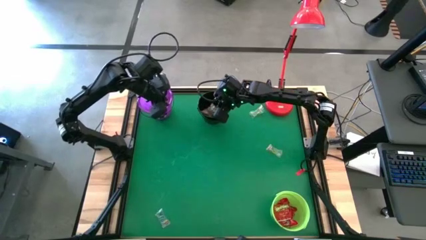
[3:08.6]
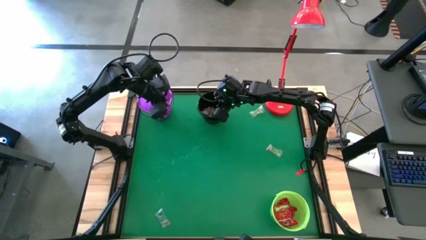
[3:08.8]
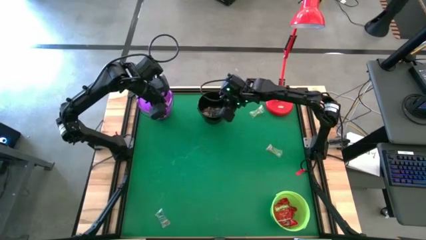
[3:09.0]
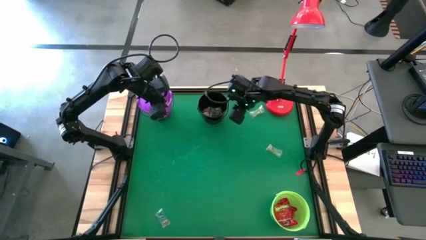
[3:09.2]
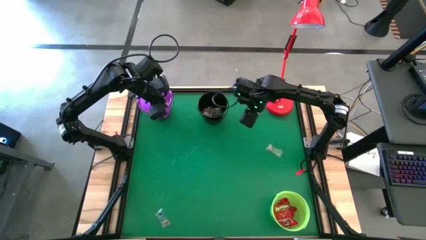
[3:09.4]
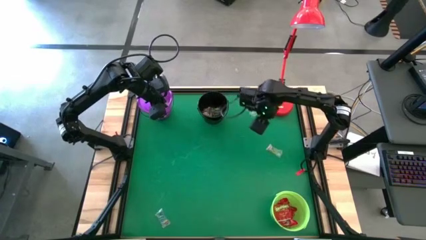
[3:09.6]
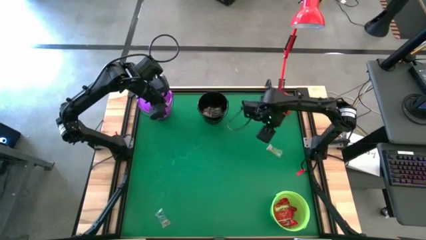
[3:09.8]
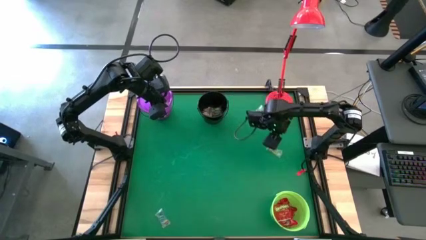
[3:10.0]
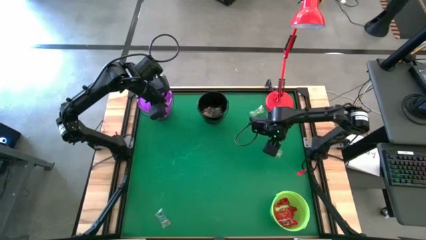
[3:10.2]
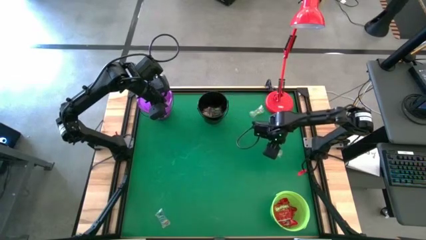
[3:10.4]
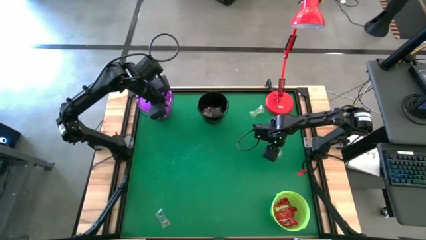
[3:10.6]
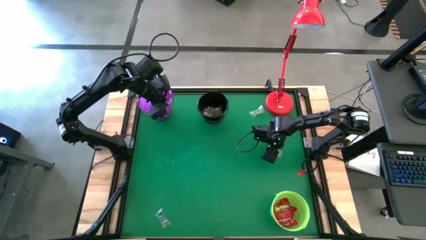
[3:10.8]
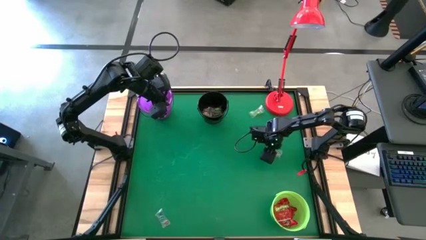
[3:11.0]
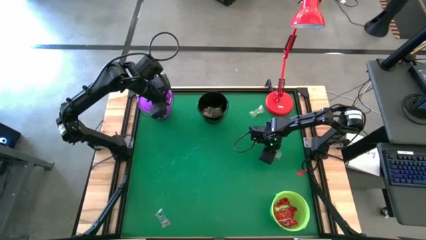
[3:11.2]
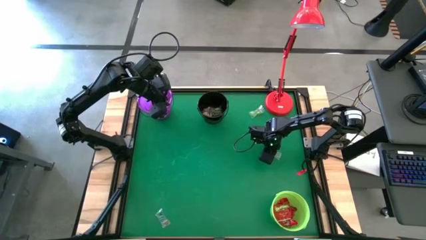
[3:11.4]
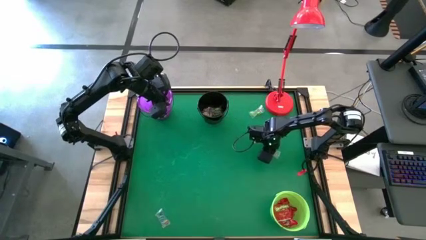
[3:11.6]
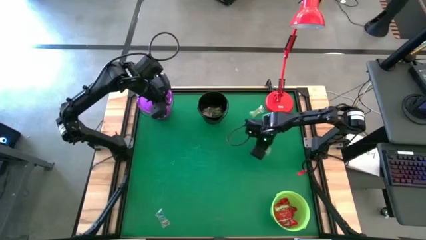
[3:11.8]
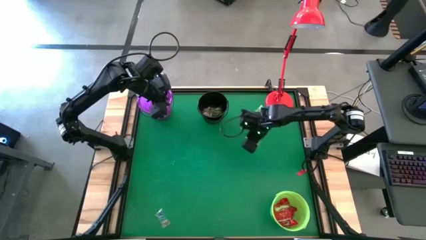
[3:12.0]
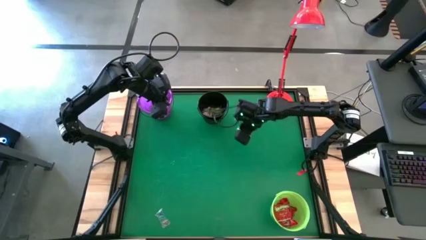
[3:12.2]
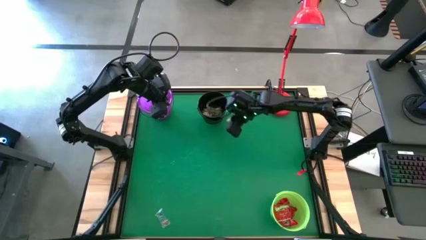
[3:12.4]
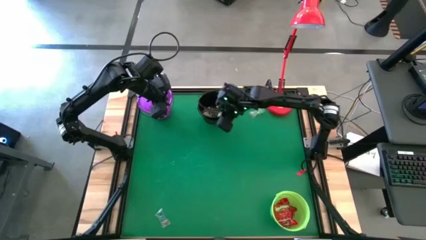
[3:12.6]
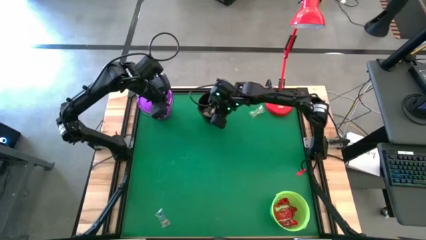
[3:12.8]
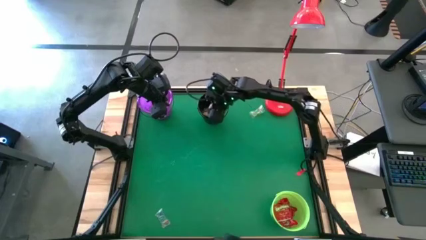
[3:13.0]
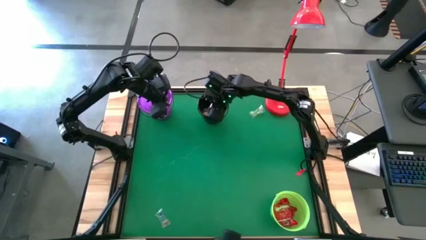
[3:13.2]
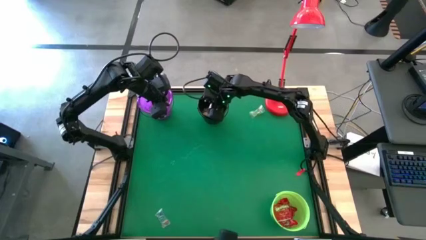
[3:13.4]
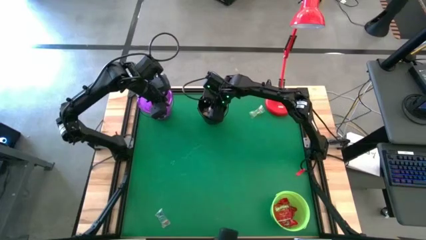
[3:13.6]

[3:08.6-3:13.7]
Task: Sort candy
Put the bottom green gummy into the black bucket

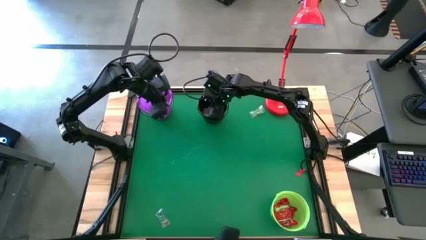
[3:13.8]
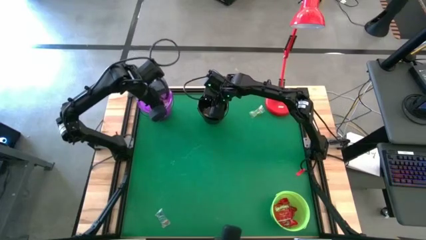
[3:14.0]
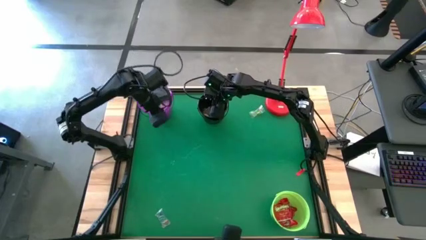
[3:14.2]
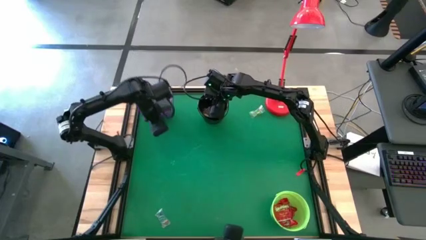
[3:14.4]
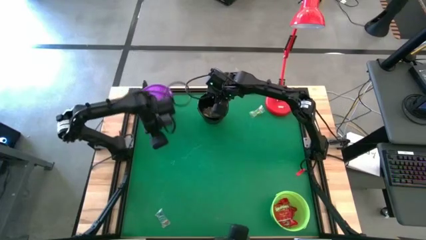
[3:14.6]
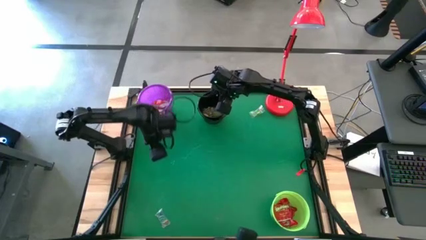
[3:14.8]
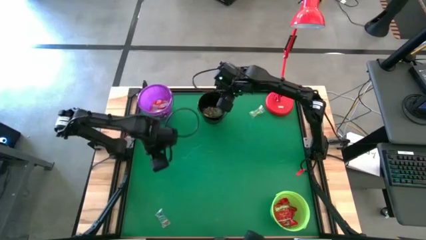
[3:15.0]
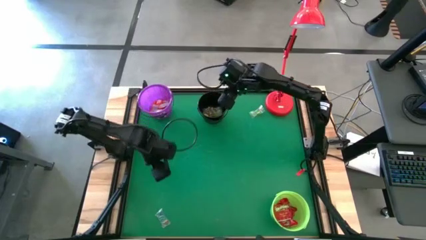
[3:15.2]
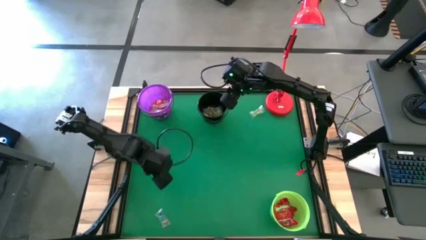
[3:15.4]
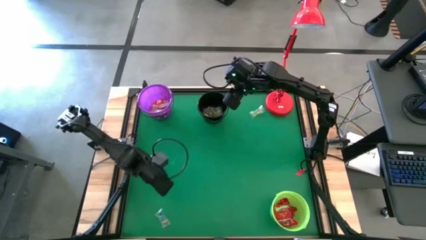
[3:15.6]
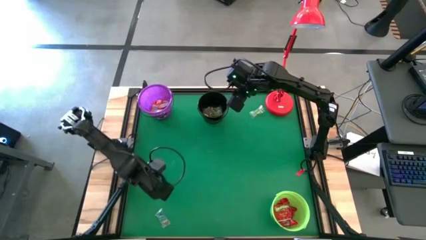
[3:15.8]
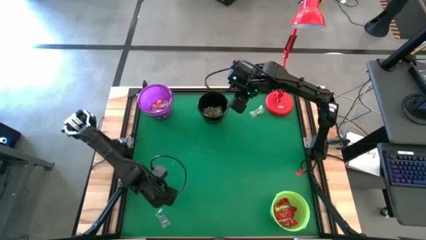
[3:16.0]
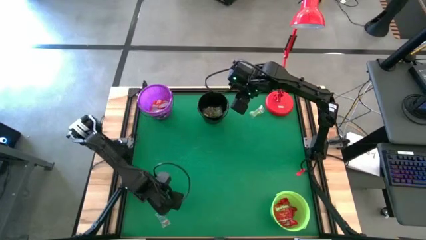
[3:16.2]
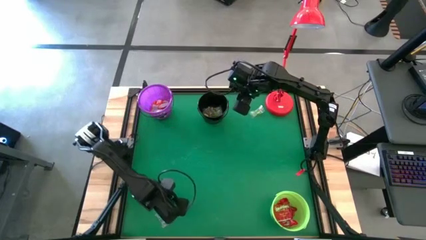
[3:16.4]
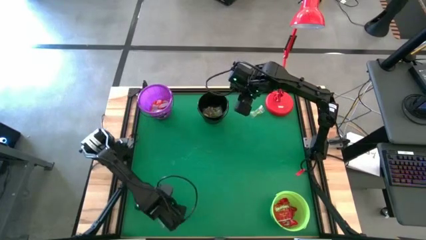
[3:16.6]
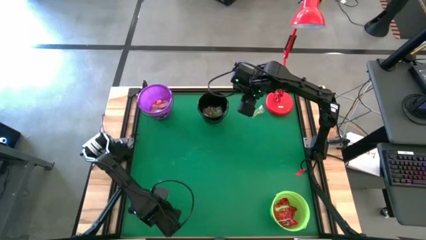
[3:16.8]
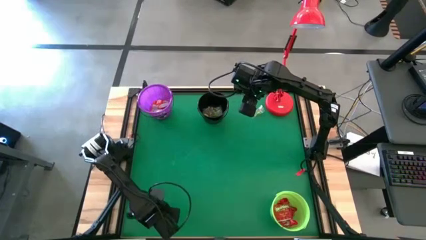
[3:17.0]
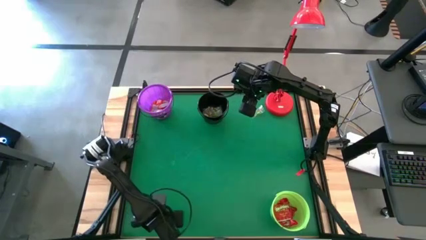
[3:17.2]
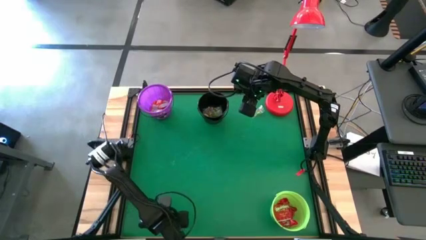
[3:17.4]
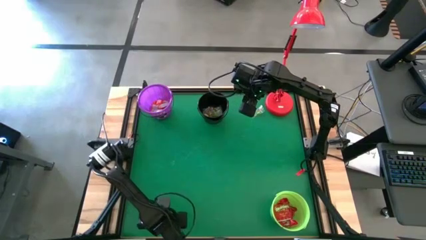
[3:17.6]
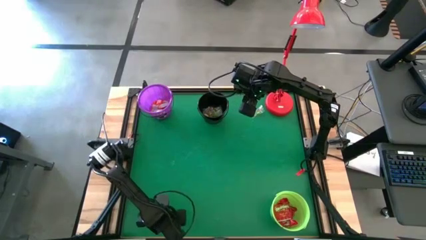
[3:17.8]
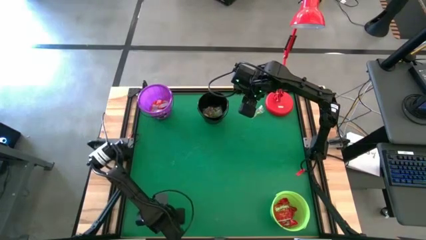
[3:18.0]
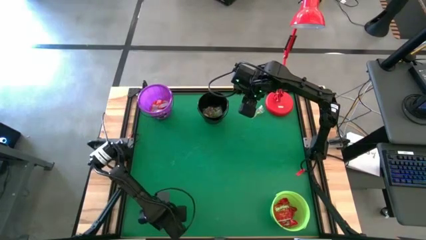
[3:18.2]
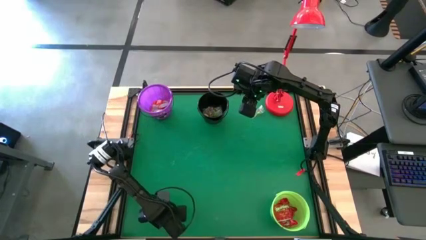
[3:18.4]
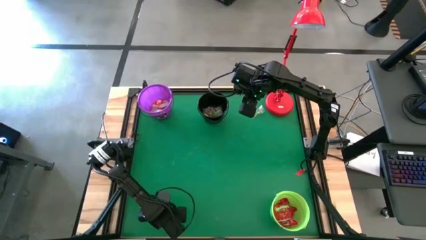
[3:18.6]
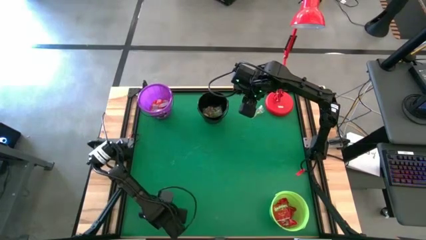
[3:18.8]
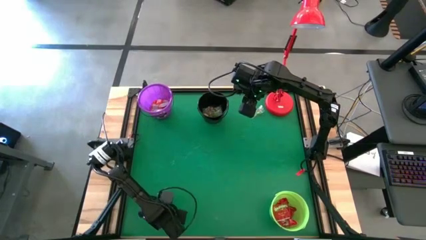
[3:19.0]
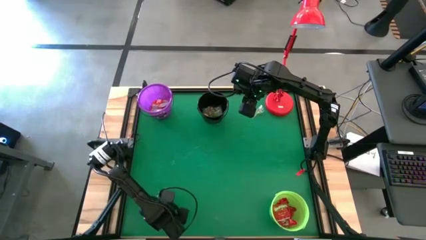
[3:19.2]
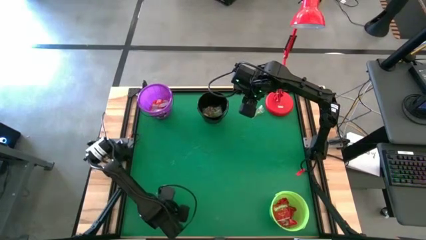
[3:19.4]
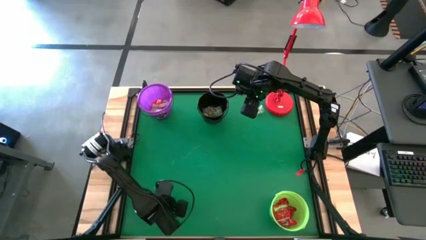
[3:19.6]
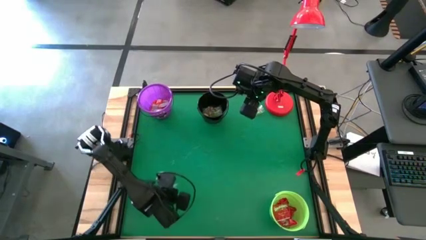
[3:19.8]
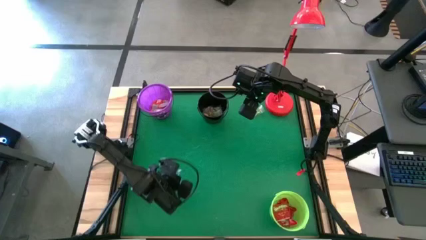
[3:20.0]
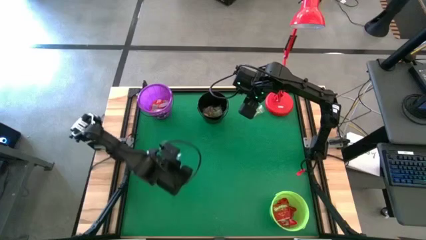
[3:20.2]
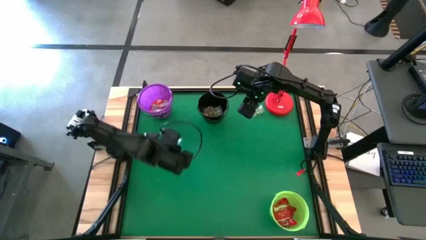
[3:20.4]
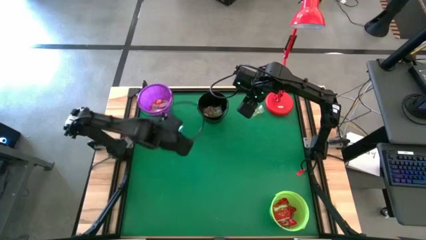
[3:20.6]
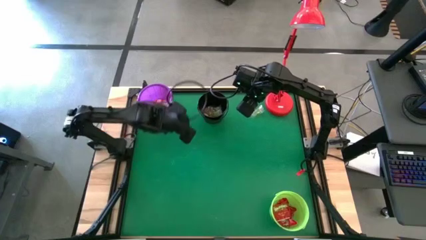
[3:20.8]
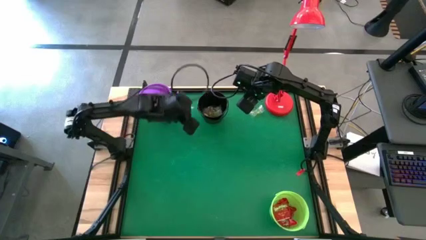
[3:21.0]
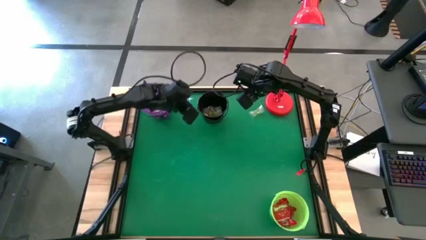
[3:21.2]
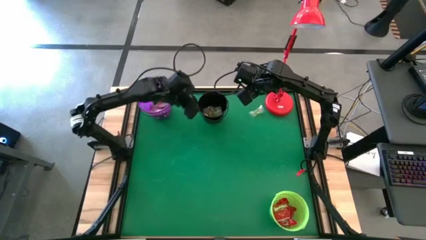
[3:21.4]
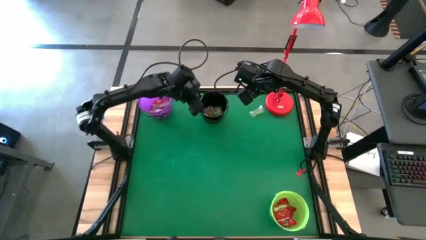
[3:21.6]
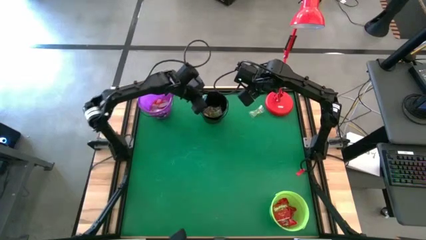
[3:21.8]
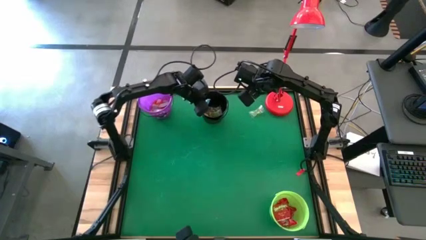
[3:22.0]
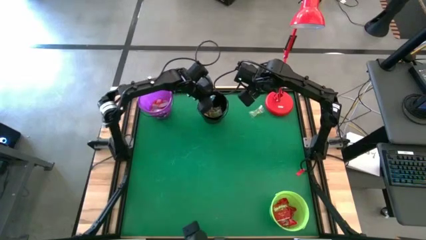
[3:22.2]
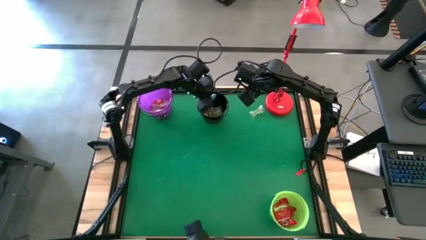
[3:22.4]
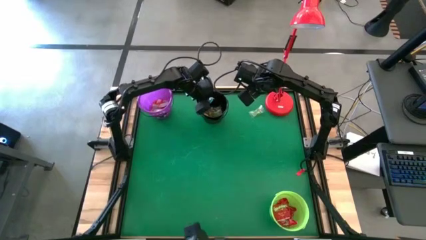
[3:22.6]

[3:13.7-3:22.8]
Put the blue gummy into the black bucket
